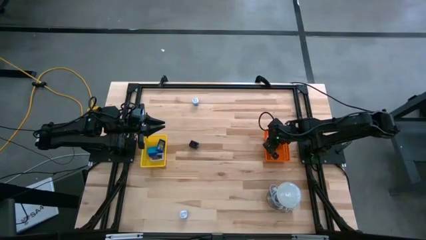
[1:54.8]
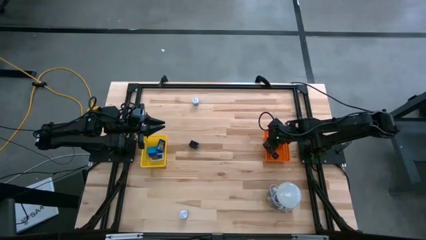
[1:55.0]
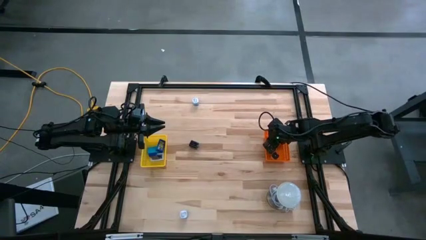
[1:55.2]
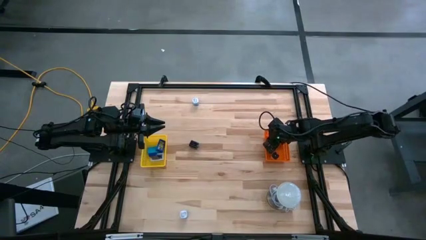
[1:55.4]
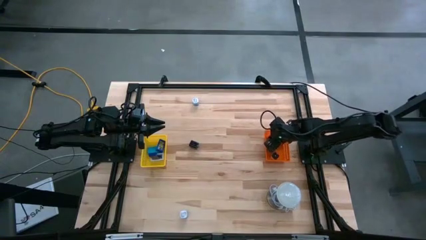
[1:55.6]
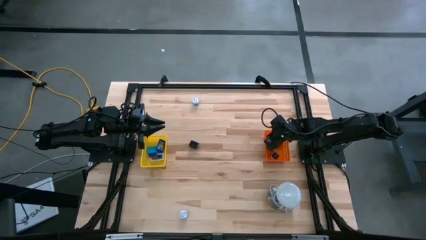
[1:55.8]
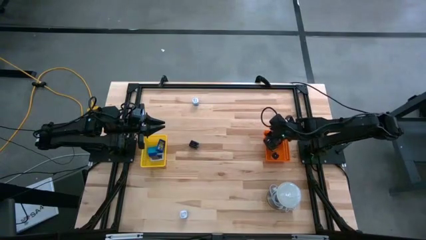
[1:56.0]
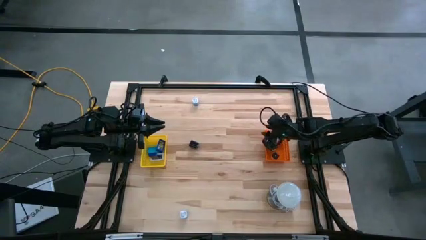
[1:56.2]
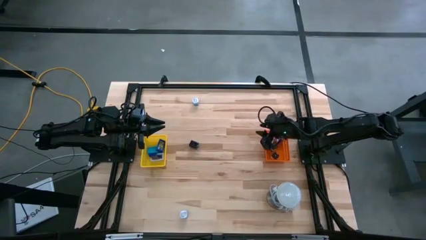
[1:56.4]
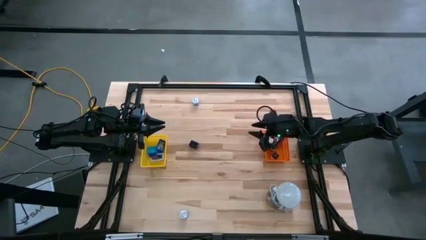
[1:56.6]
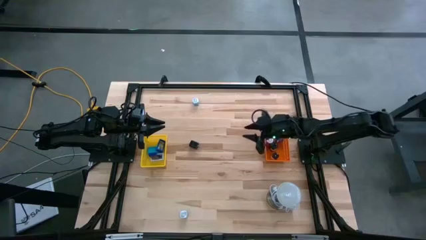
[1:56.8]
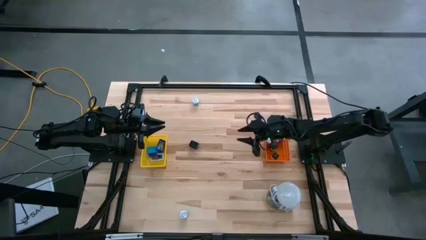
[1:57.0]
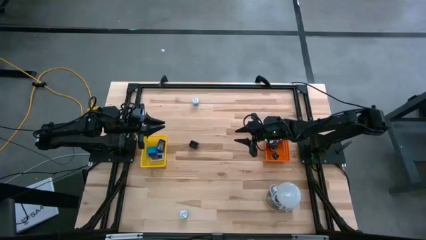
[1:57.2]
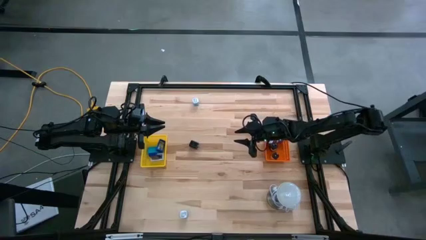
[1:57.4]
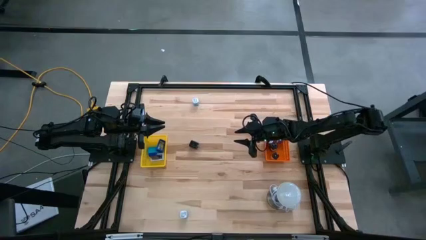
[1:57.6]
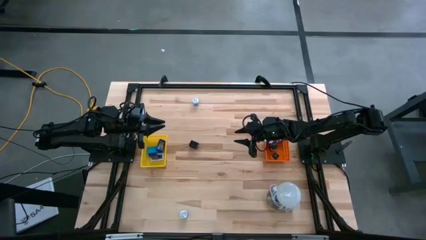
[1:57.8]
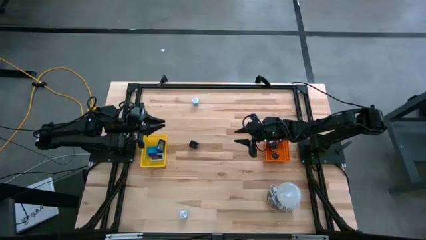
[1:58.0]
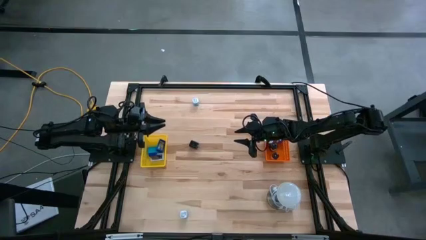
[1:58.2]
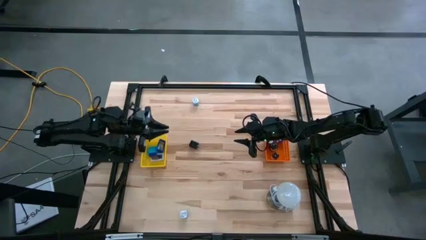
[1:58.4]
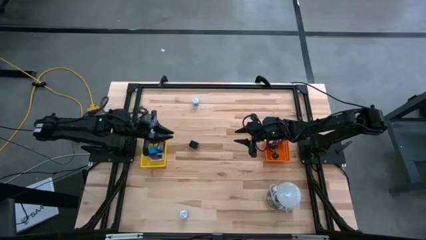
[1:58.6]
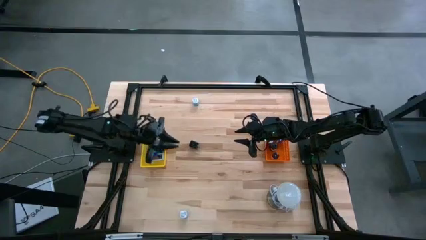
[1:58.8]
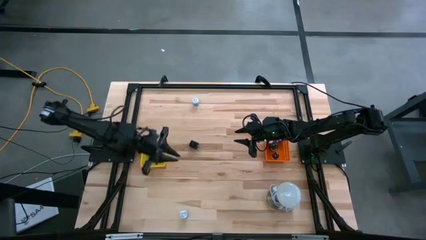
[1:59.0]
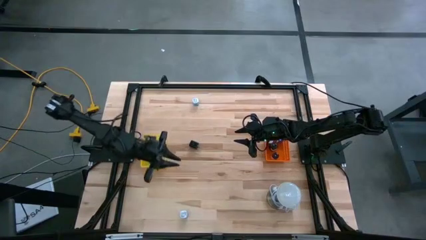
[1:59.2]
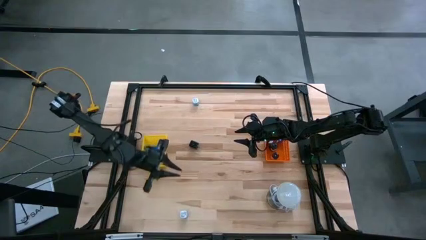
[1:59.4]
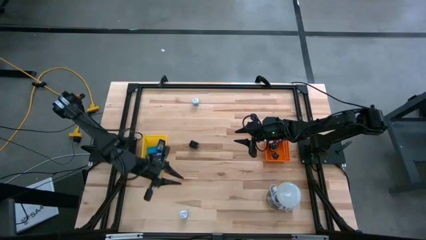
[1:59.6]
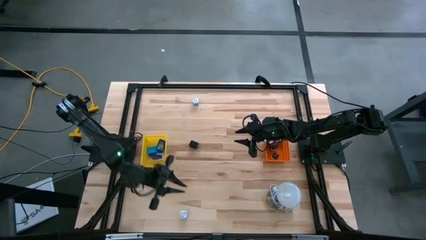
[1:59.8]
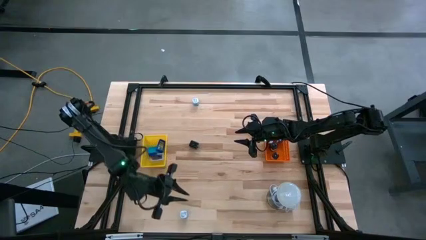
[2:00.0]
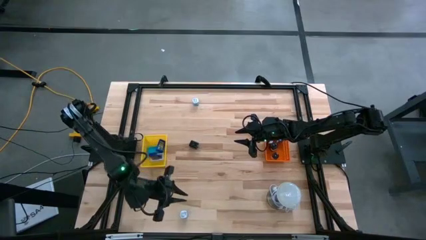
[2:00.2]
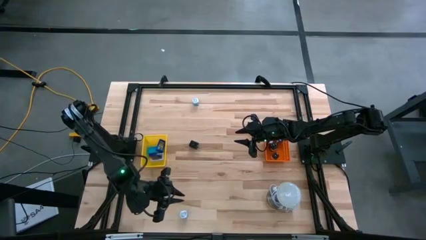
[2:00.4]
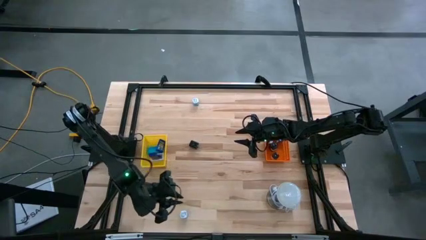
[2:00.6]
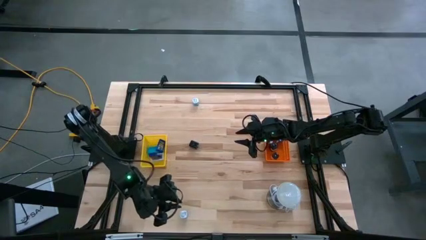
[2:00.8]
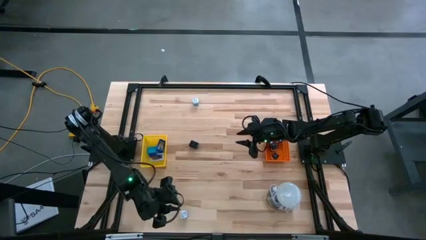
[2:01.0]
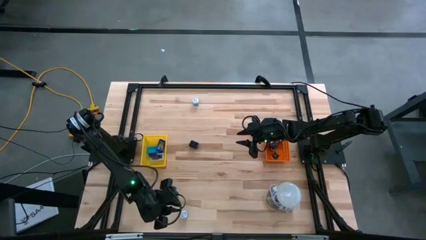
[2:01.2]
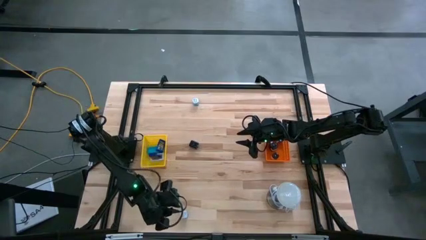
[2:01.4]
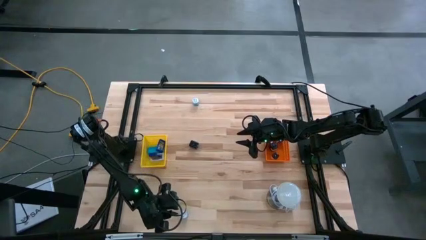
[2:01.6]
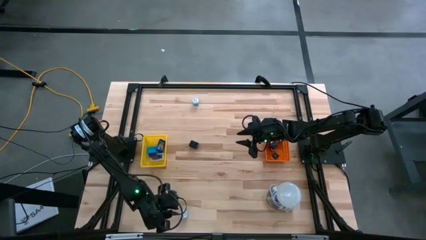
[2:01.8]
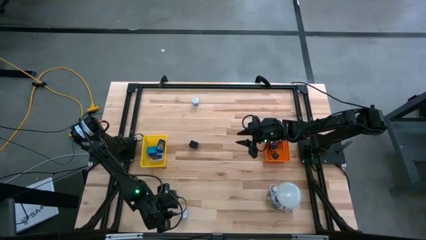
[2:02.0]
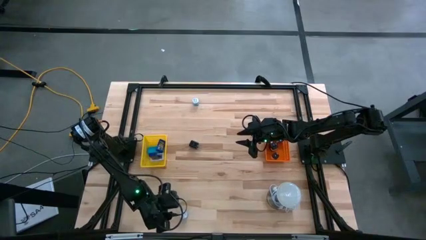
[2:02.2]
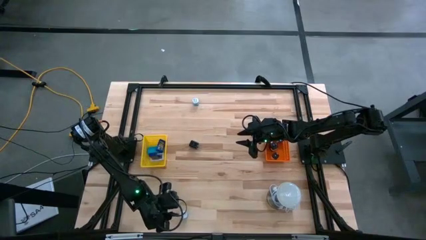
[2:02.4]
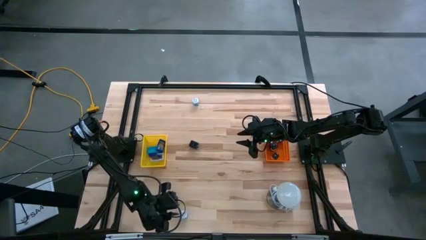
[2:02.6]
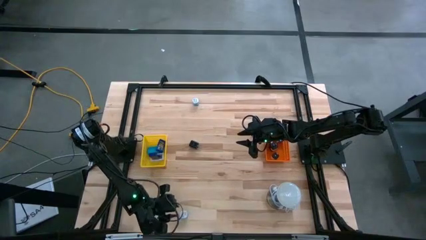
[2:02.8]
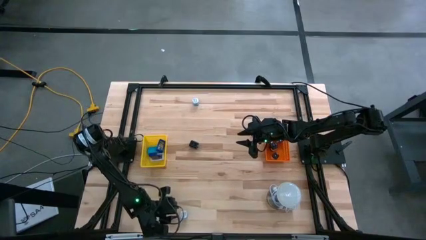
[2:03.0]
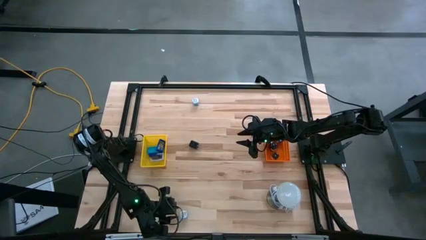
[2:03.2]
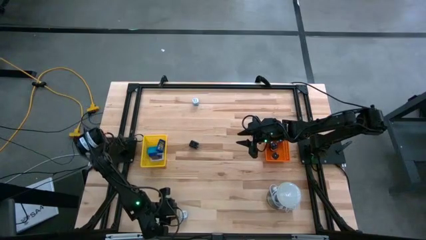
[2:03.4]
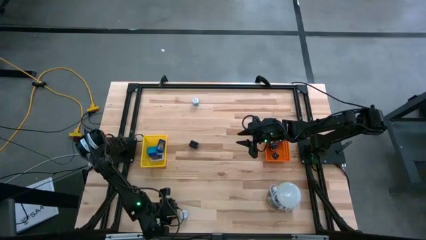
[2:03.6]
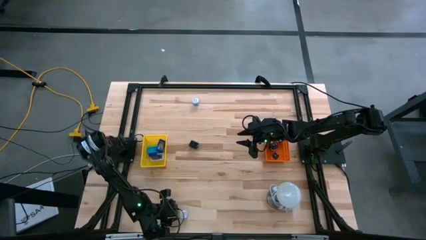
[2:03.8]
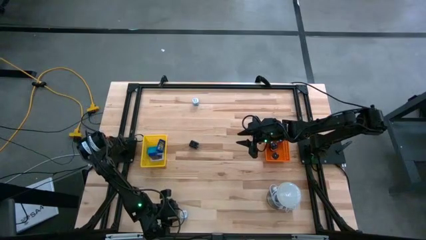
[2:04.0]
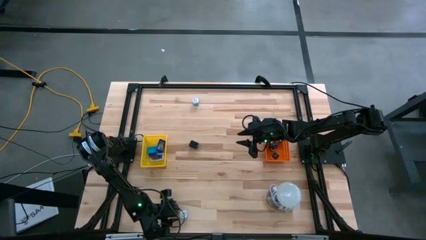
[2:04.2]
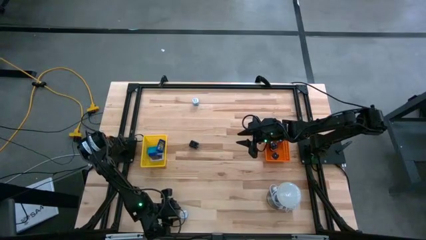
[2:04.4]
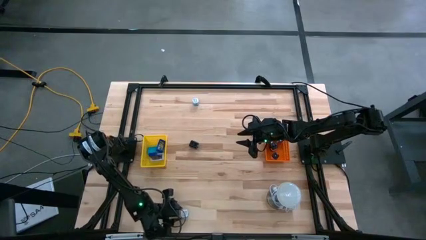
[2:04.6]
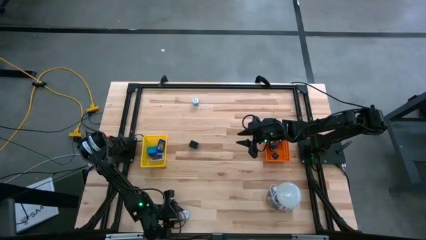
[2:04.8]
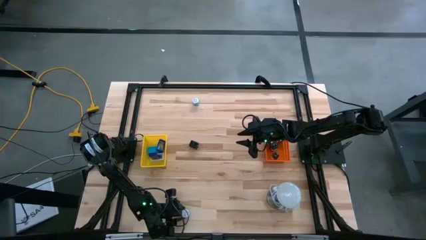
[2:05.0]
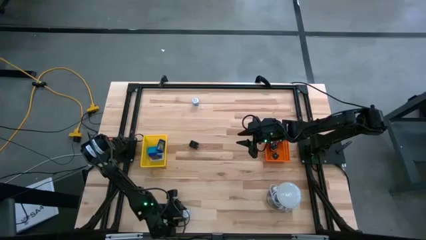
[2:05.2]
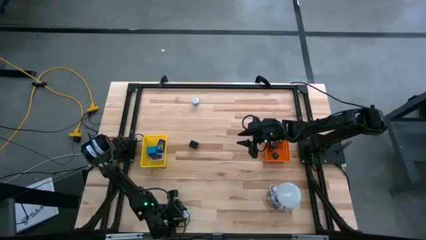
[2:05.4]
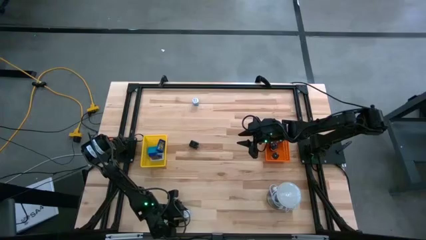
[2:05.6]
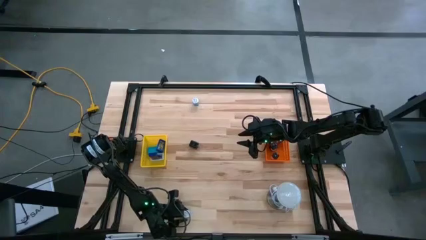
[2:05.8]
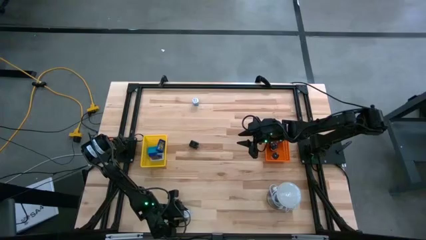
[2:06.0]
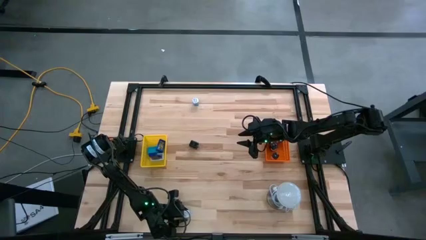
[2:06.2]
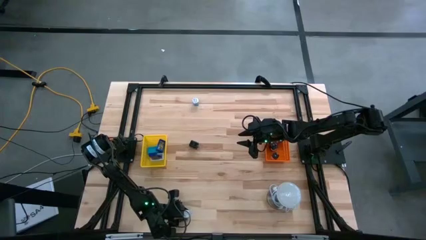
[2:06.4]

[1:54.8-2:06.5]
Task: Pick & Place Office items
Put the bottom blue white charger adapter into the orange bin

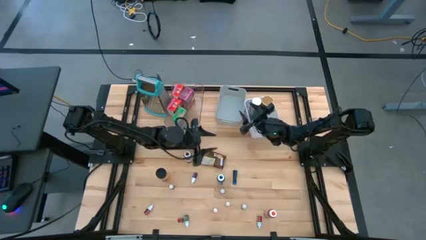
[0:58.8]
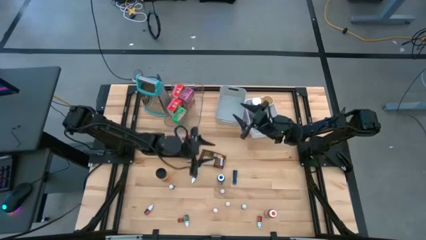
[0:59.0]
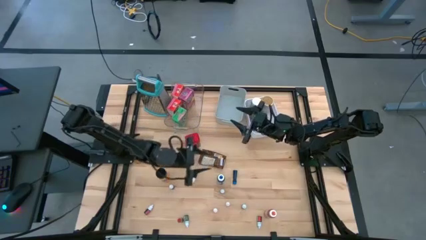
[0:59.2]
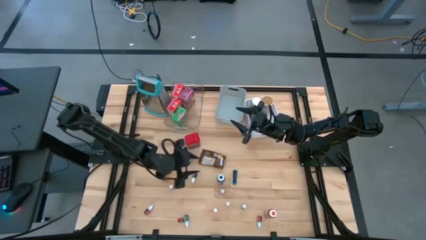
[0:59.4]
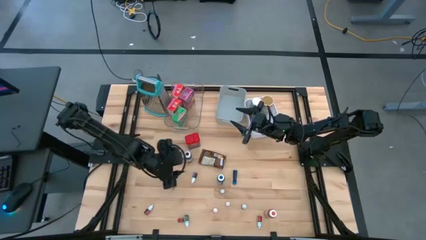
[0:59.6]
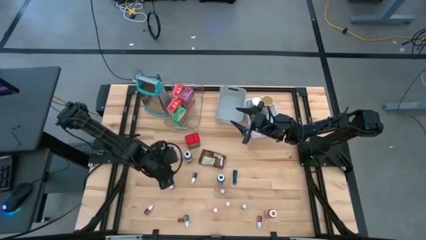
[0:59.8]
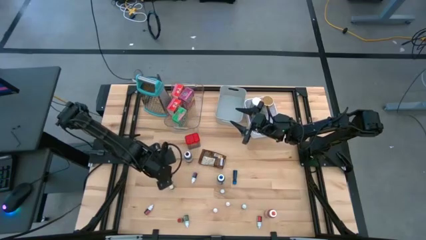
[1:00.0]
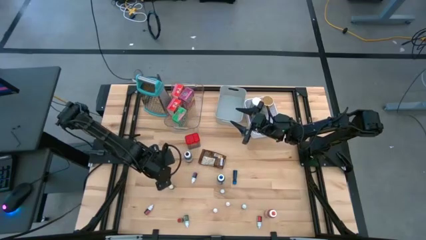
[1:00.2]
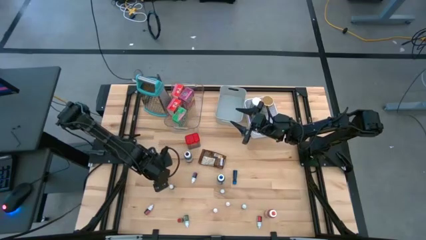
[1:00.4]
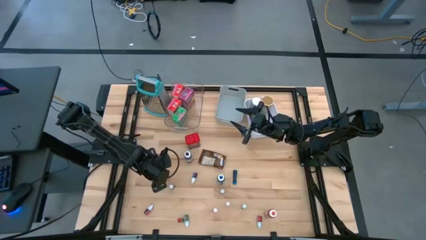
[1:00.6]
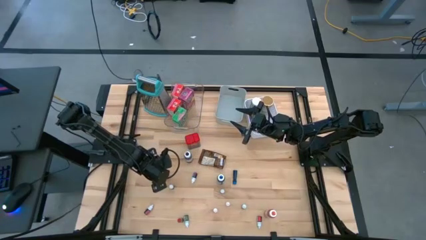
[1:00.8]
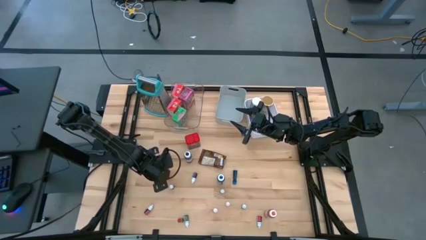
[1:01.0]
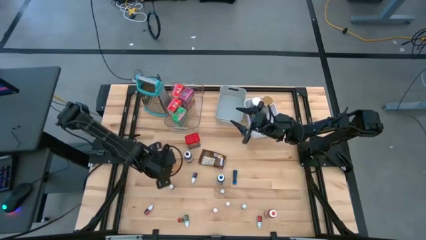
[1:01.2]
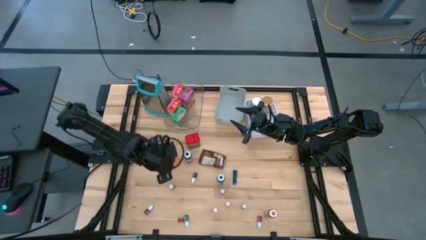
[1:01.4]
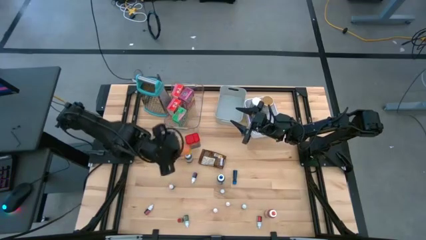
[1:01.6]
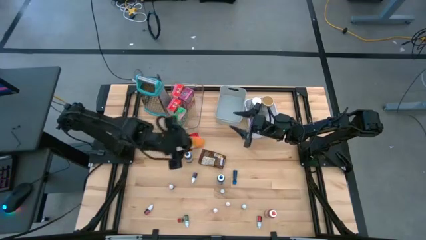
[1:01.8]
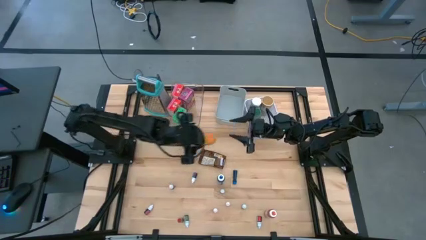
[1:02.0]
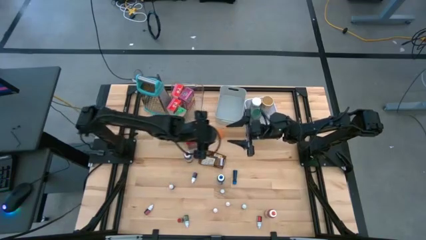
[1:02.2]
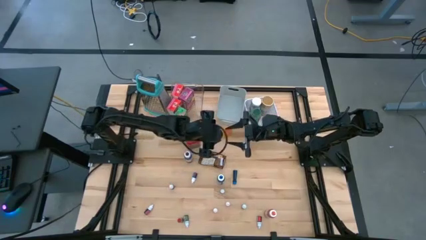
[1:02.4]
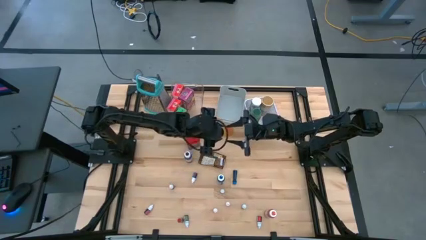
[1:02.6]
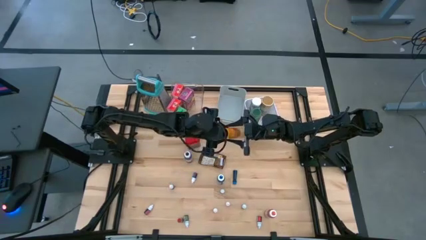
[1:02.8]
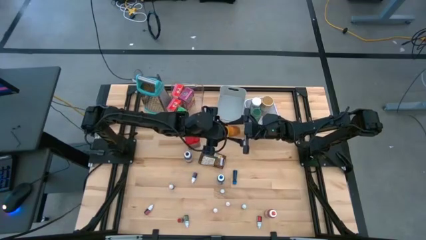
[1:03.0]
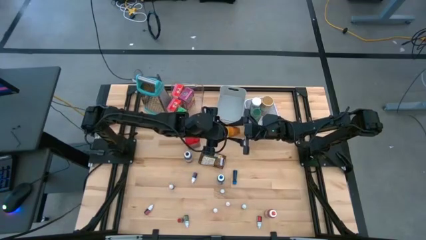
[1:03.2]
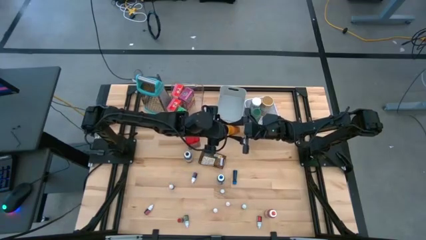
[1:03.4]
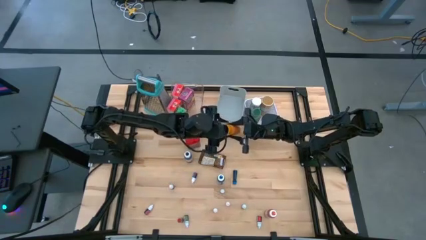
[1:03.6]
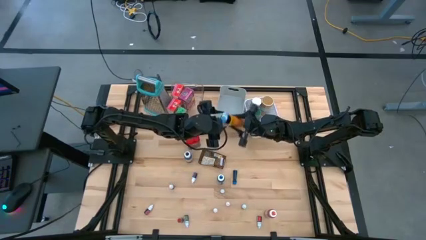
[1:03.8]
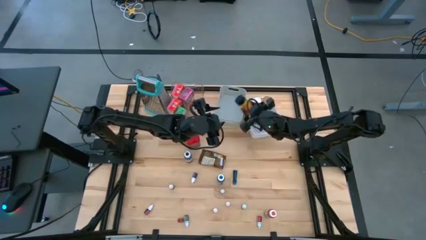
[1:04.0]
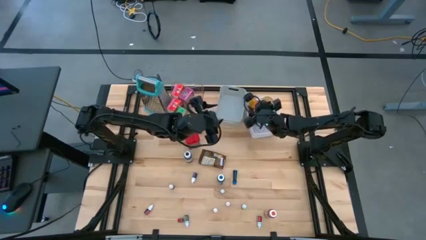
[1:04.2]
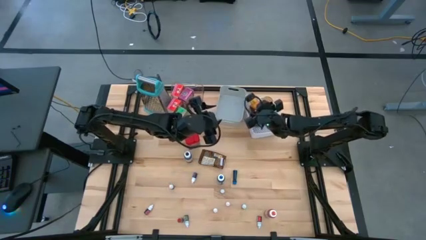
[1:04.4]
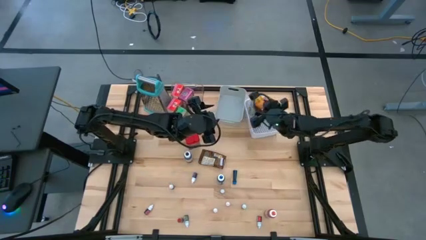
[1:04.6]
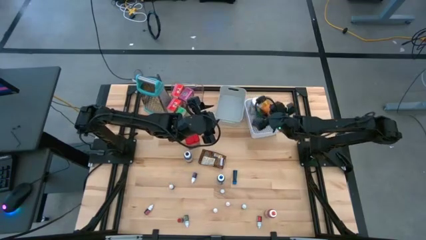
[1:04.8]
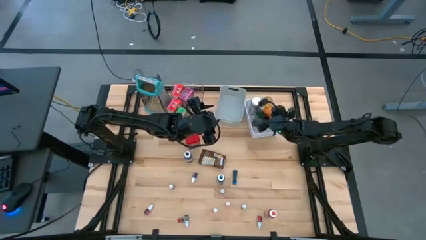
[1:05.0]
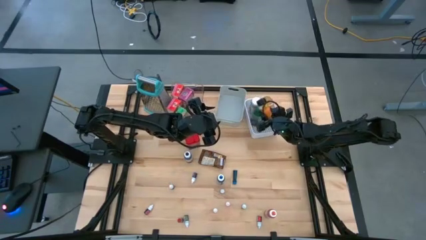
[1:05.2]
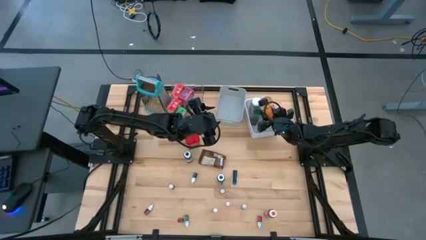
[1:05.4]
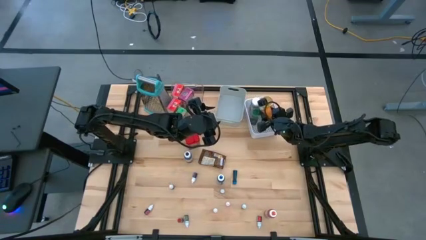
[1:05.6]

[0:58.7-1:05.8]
Task: Pick & Place Kitchen Items
Put the orange spice bottle into the white bin
